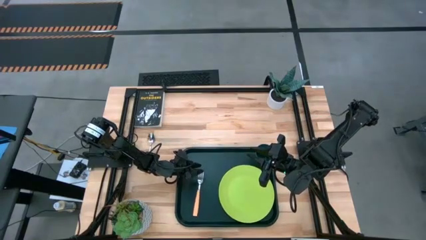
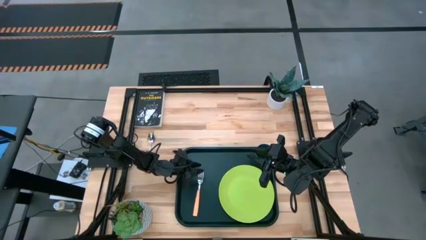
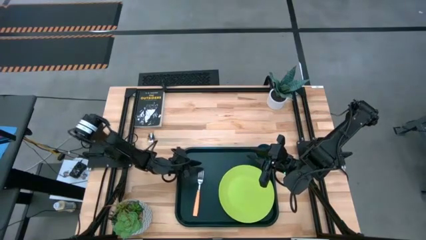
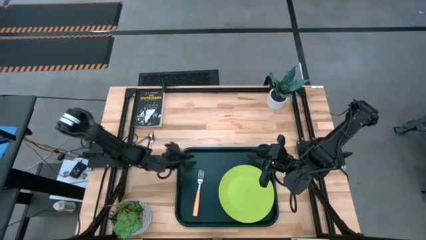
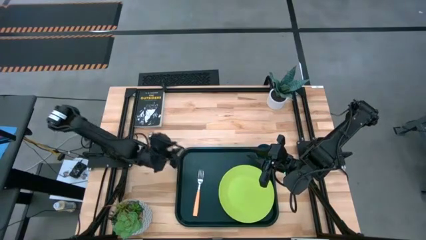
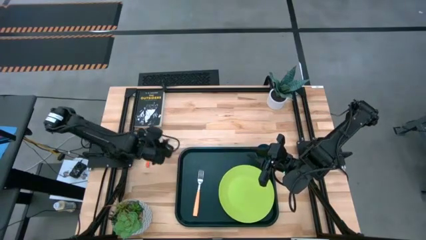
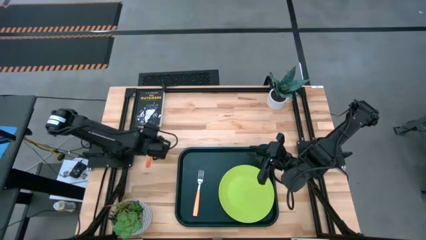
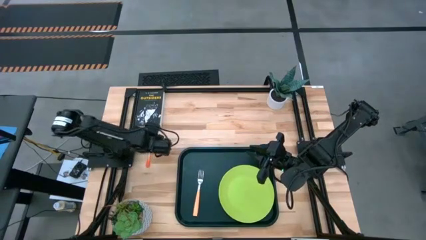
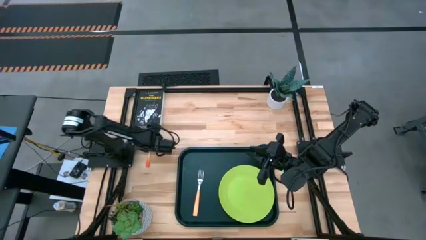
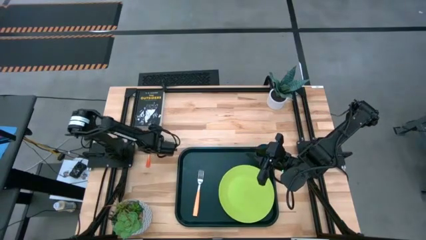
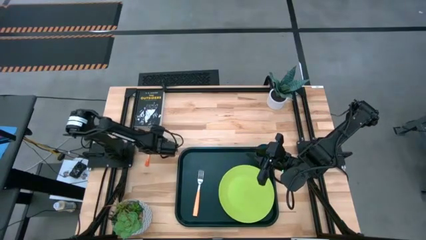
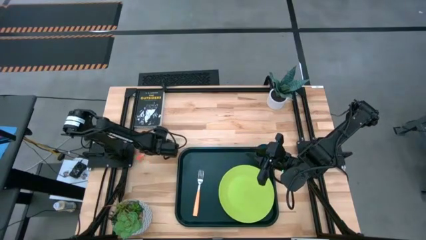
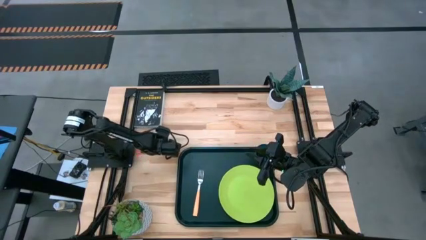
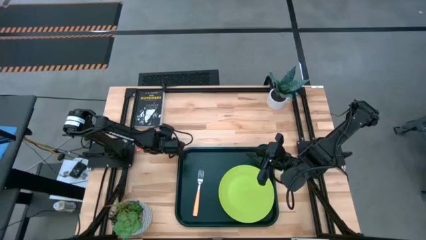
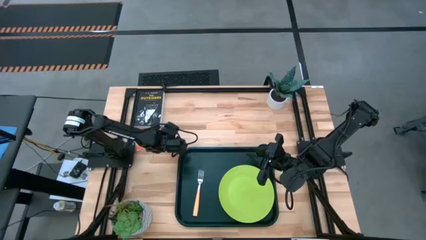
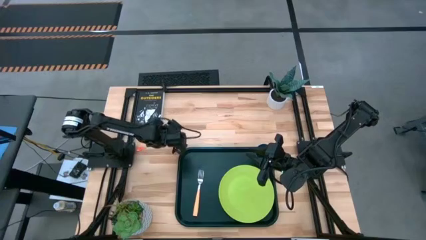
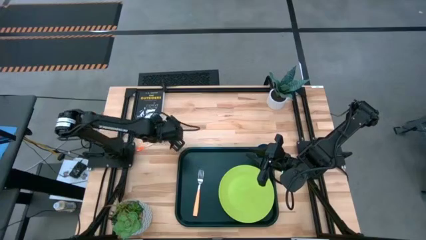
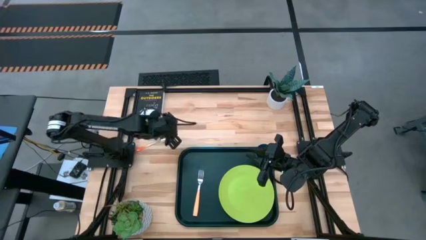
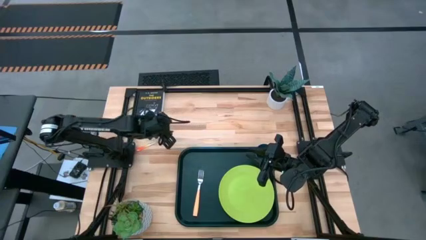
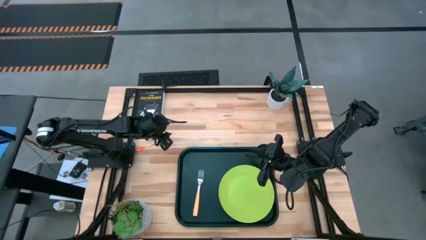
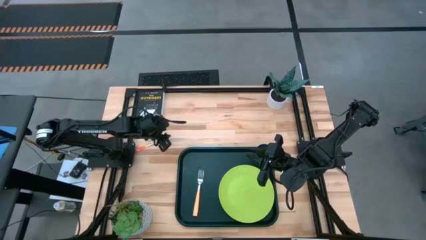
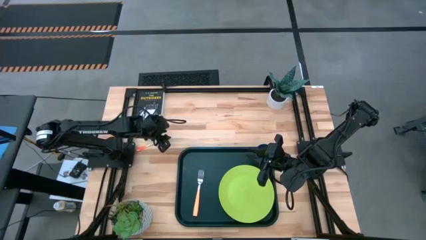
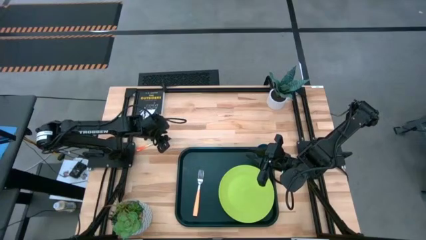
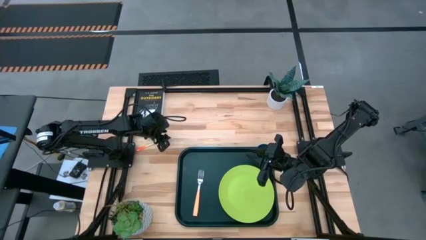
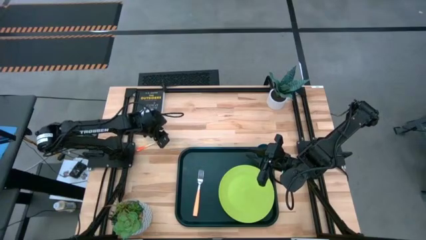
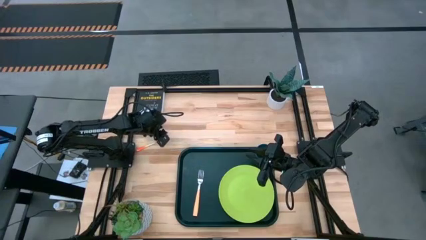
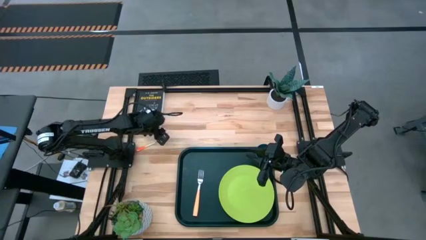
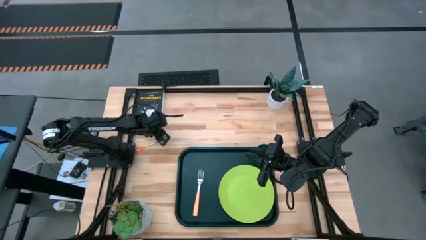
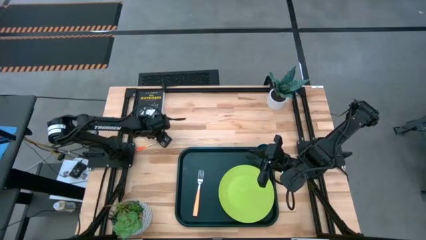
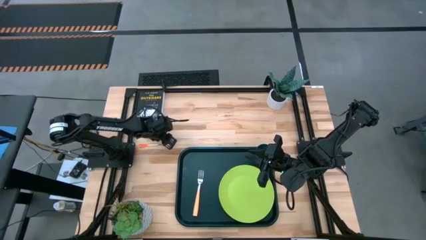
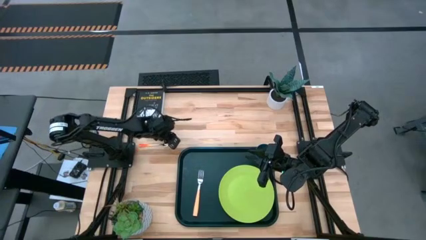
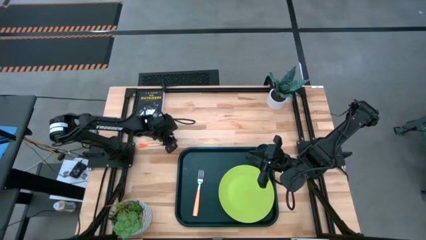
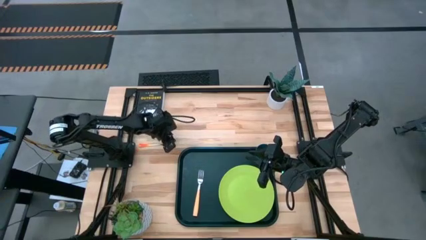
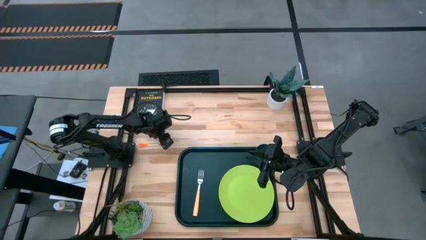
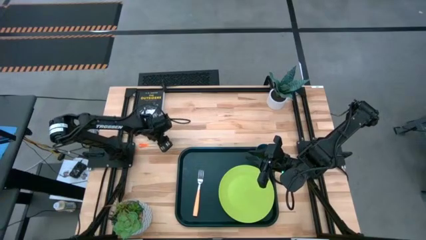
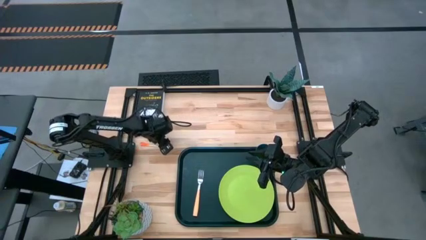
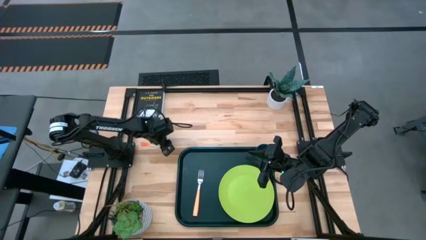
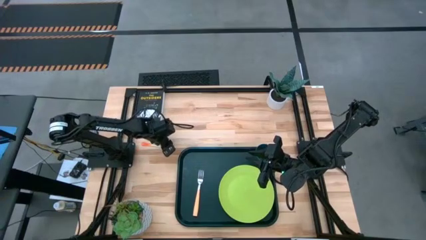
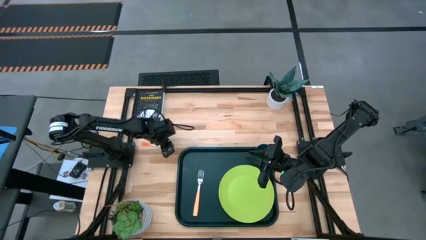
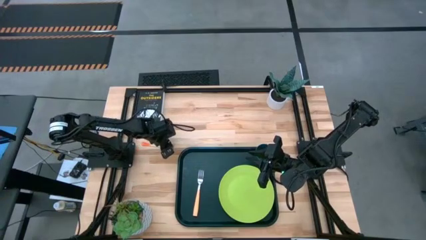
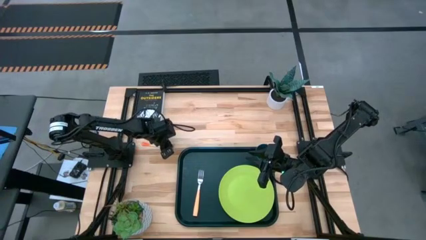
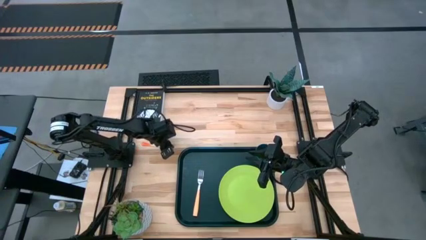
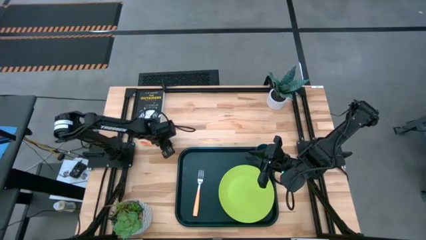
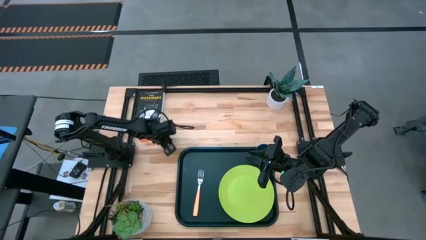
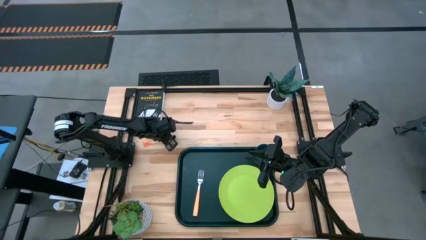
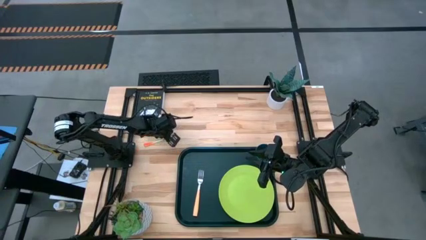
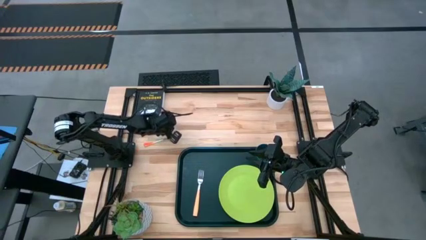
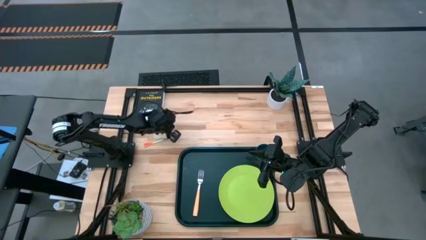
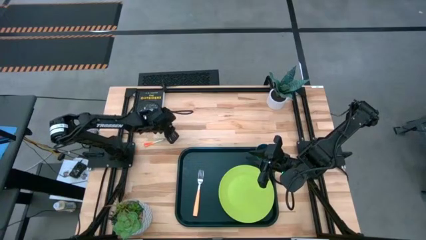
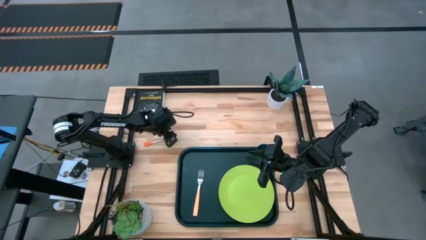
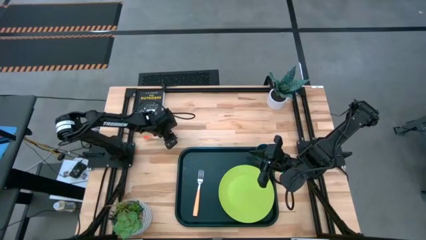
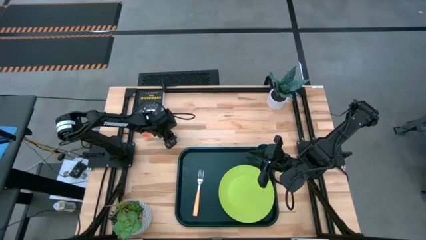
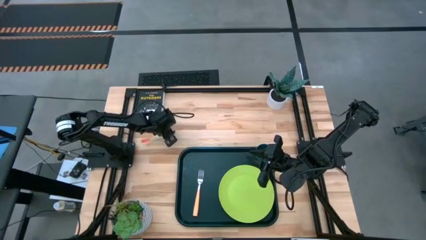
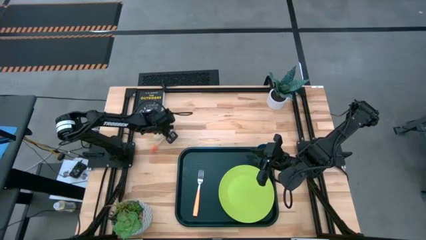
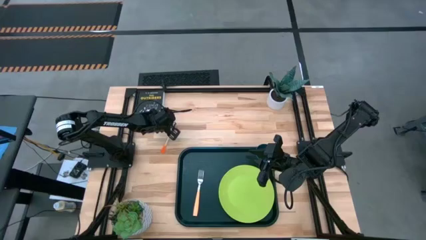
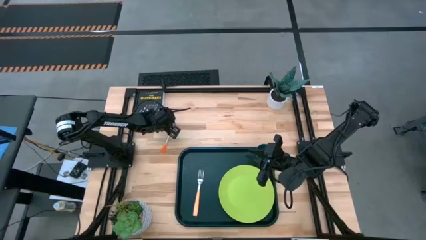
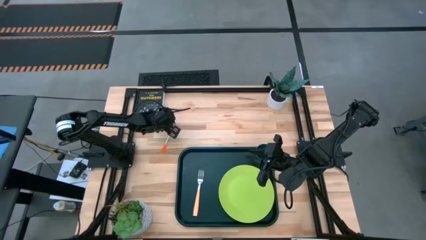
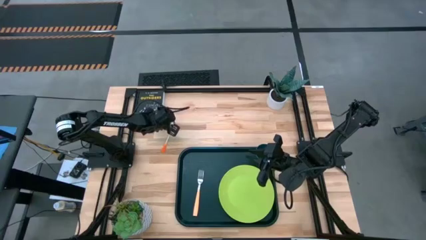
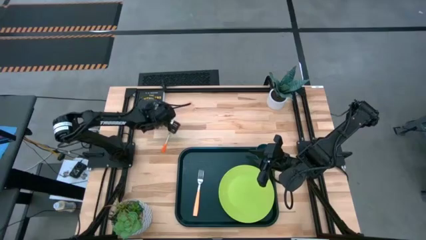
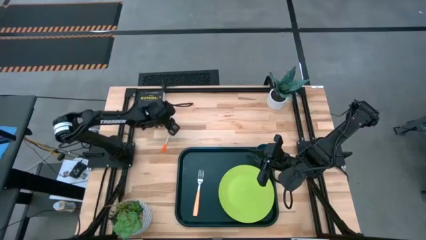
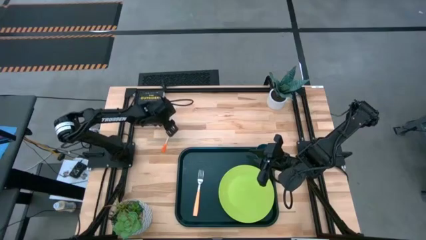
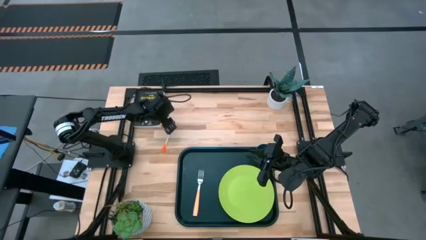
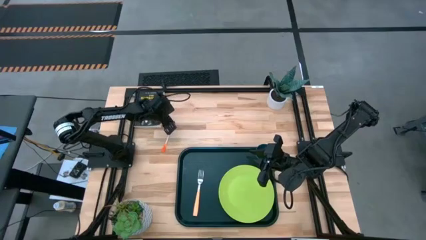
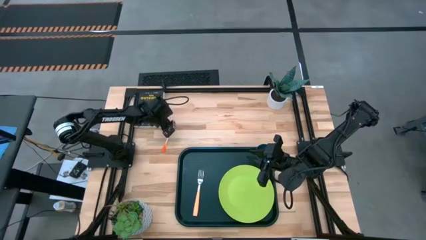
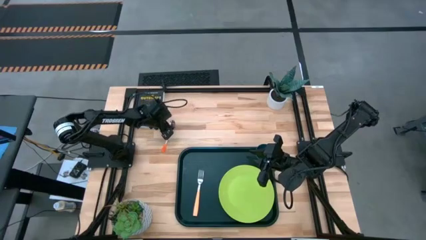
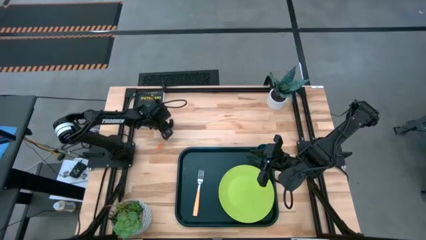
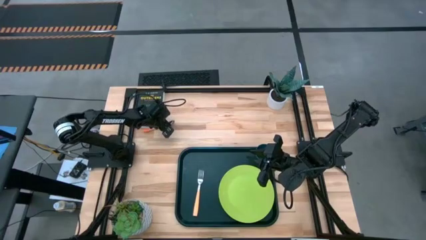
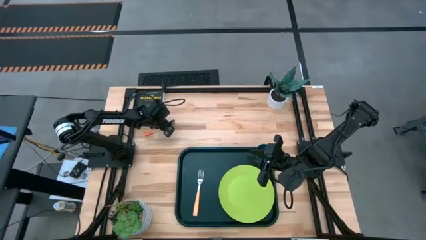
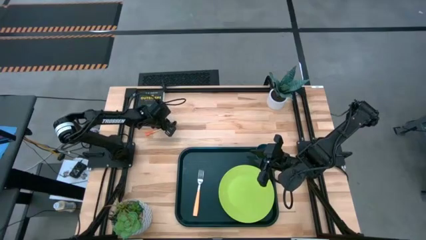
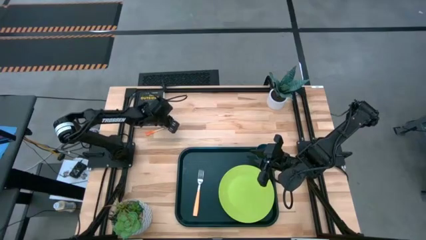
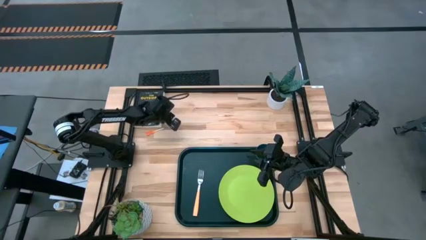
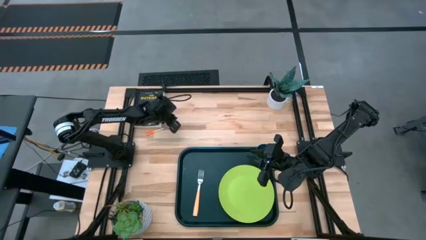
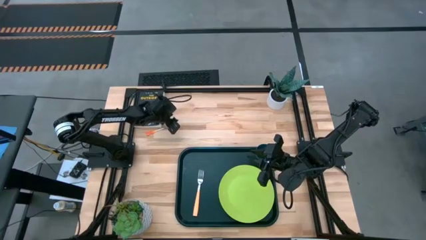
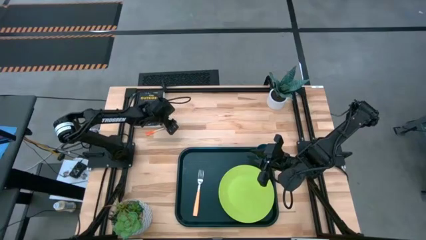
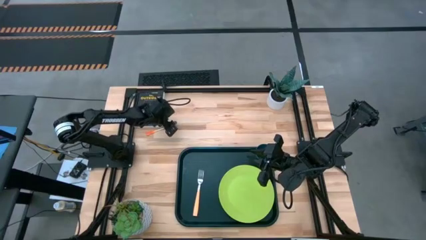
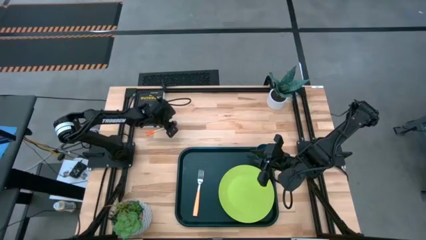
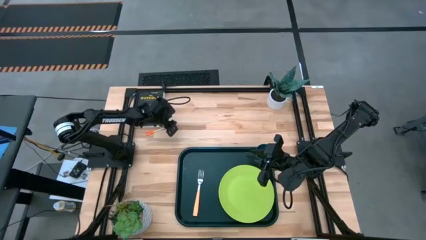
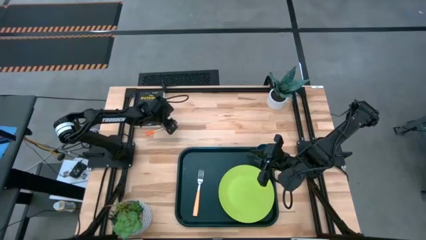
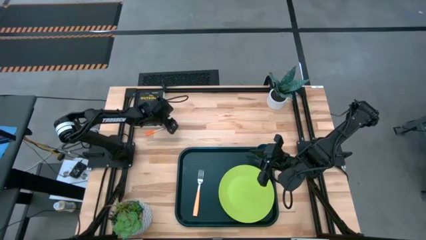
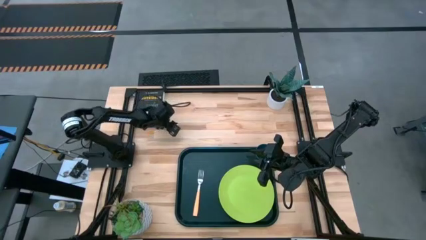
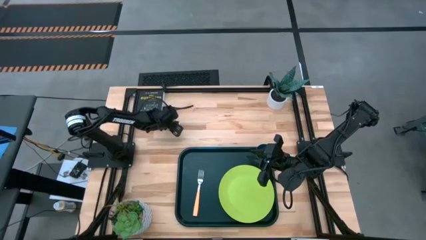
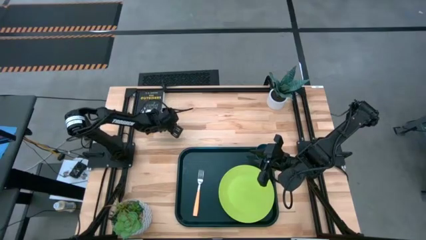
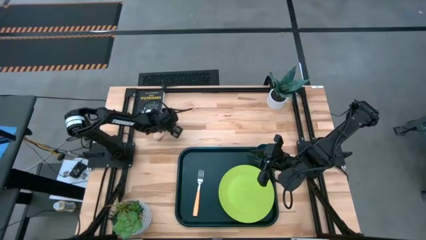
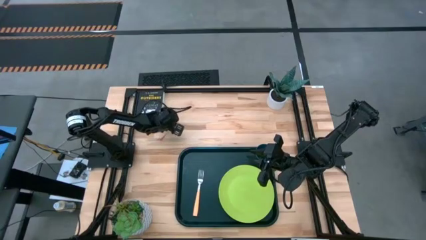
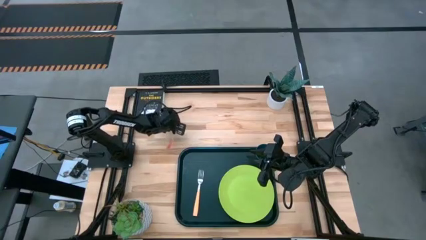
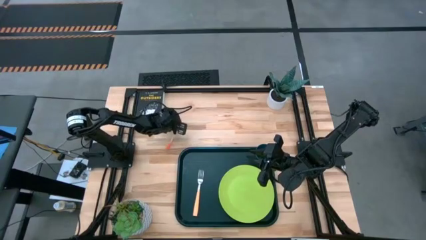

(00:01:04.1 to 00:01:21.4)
Task: Pick and place plate/cup/fork/spoon on tray
Put the orange spoon on the black serving tray to the left of the light orange fork
